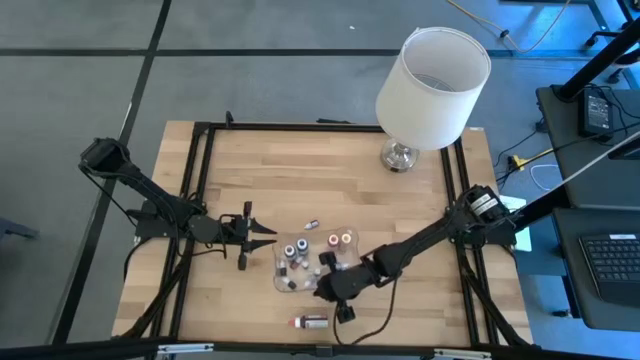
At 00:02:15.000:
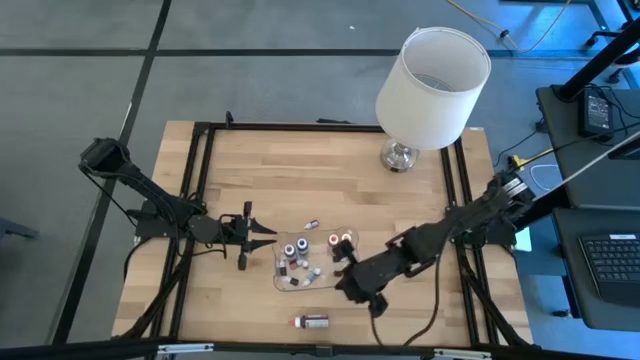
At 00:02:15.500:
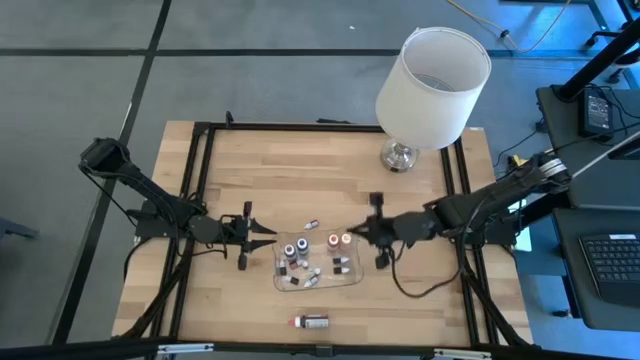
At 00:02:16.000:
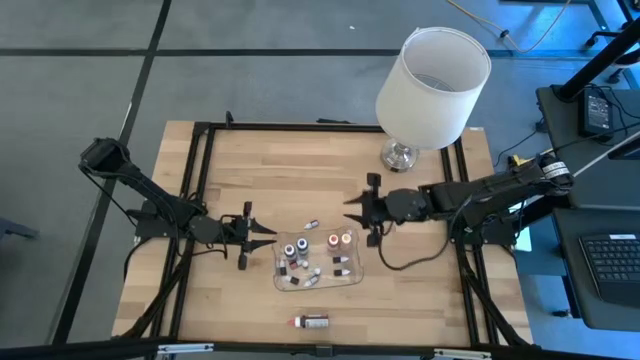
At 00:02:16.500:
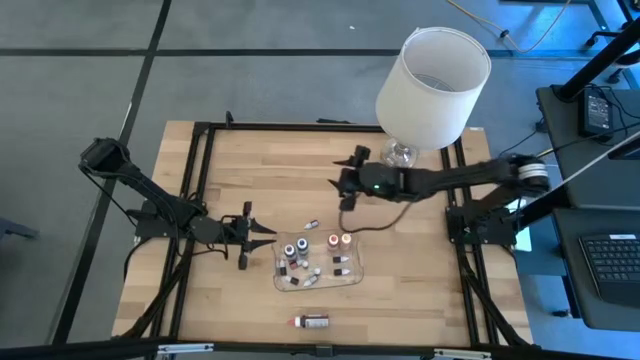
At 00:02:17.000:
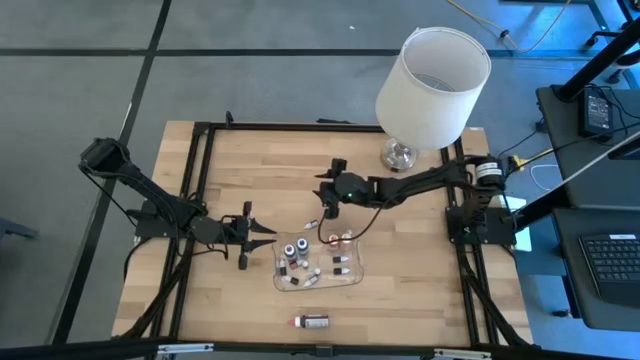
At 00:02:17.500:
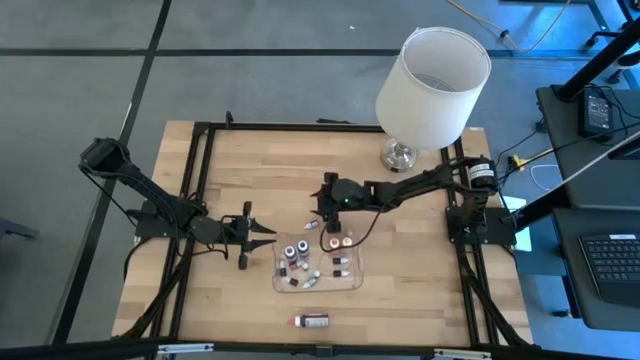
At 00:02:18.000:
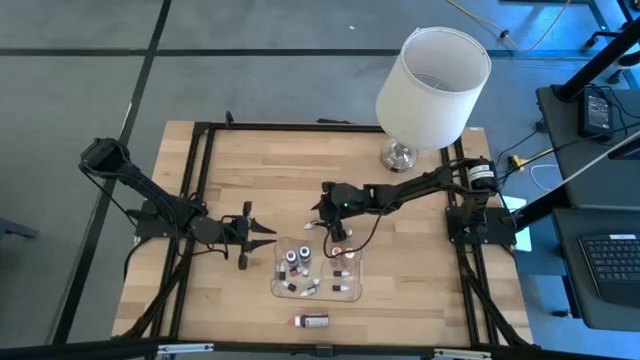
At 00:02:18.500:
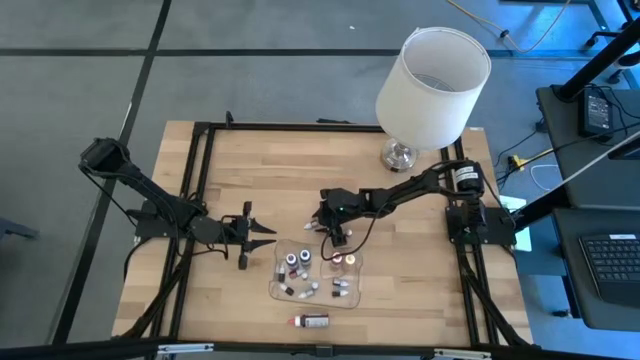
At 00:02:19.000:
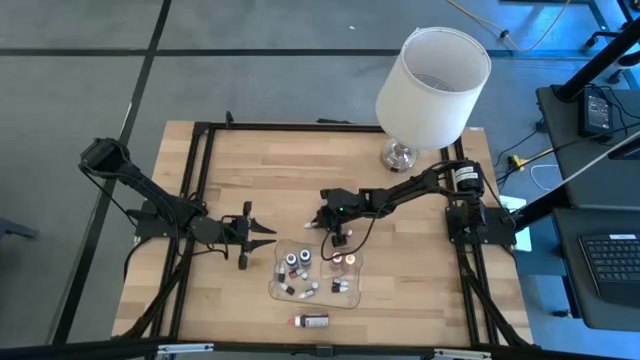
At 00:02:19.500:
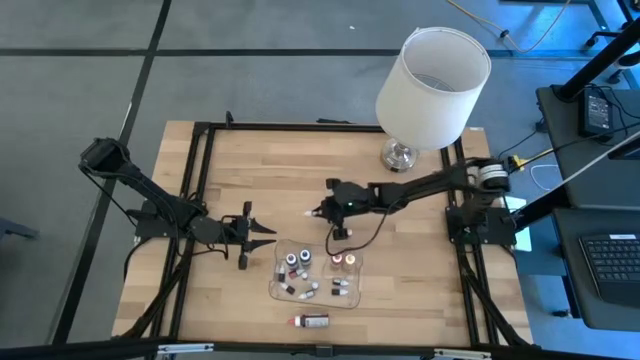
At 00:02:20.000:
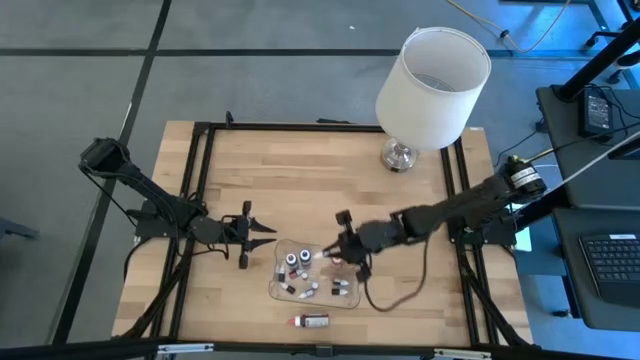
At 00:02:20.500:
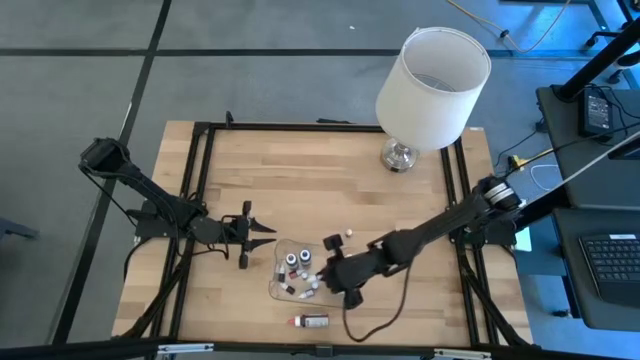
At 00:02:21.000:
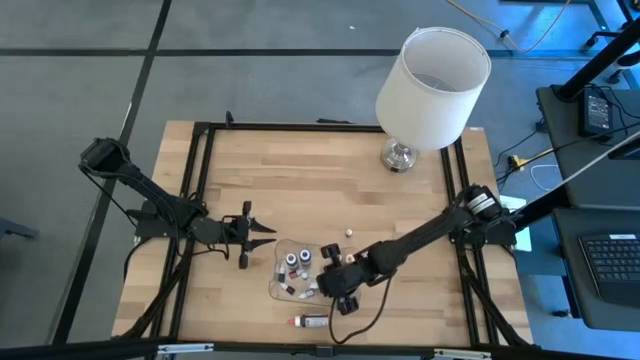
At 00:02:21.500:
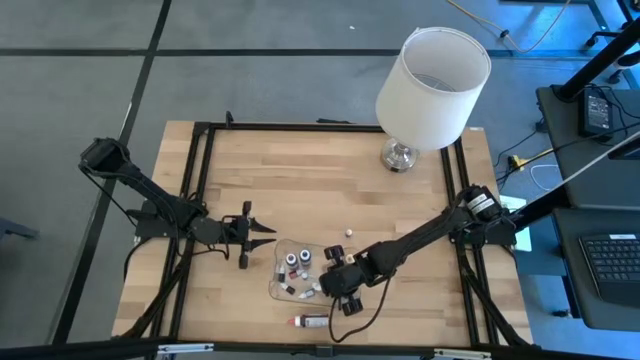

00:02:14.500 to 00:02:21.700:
Task: Pick & Place food coloring
Put the small white food coloring bottle into the container

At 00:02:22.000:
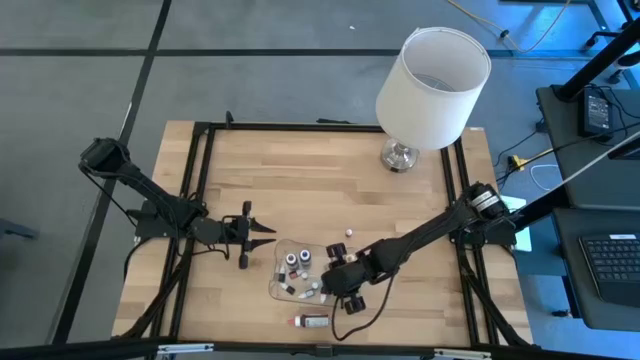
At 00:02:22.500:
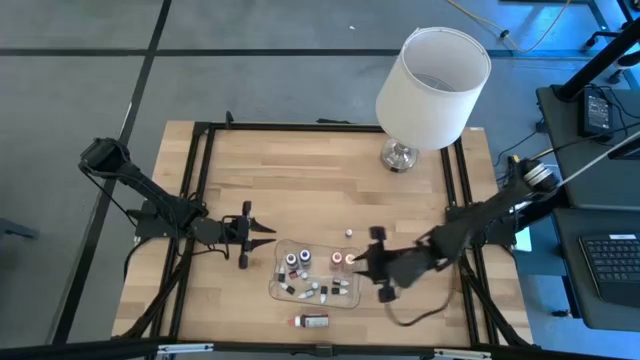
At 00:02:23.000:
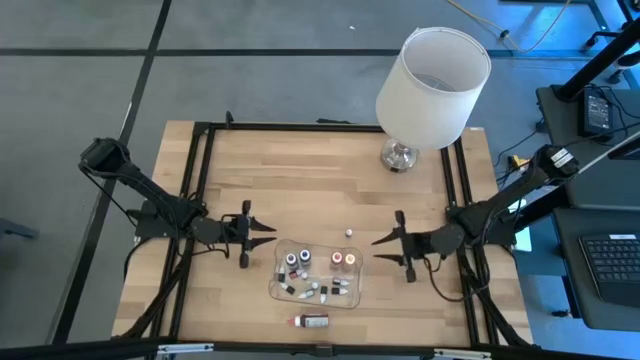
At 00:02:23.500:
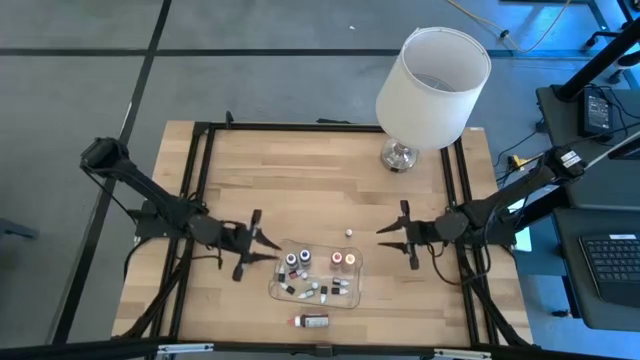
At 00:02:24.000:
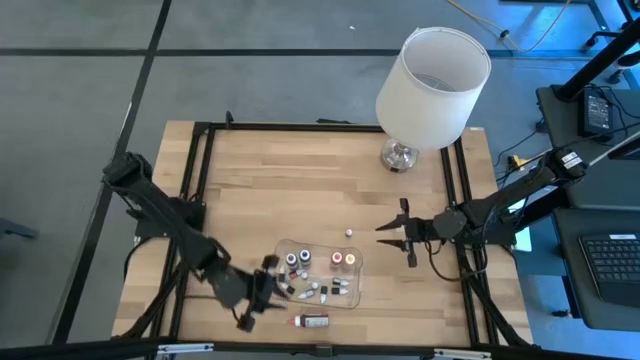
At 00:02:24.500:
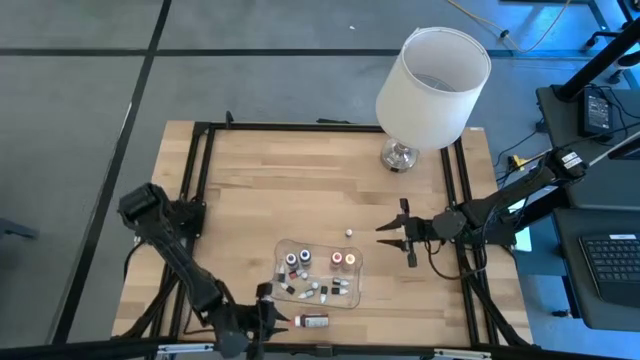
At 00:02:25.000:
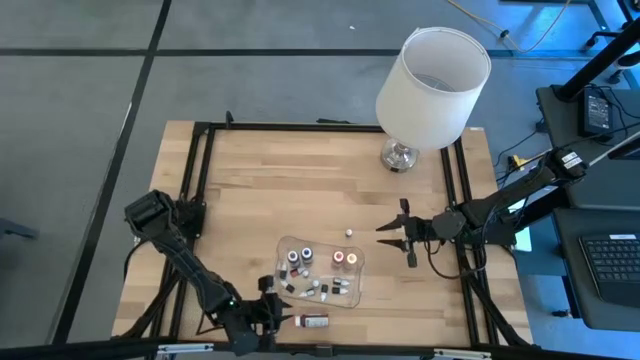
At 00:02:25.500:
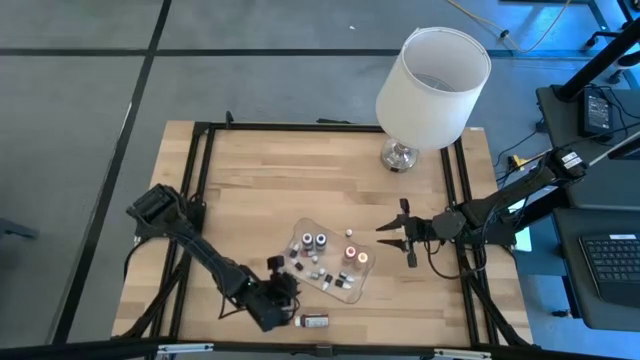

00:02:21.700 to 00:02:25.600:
Adjust the container

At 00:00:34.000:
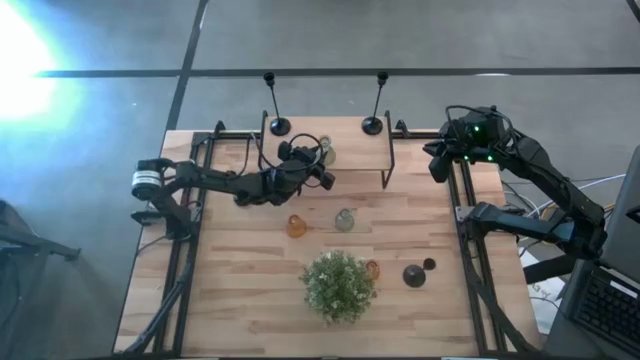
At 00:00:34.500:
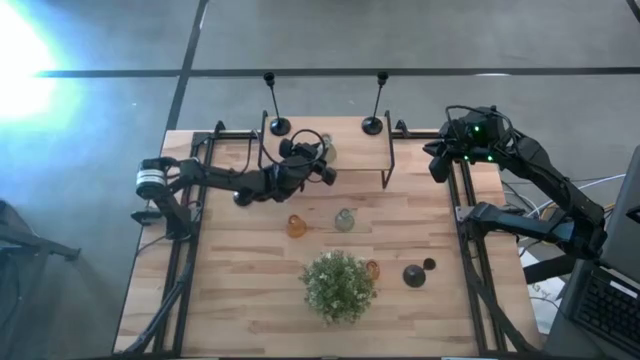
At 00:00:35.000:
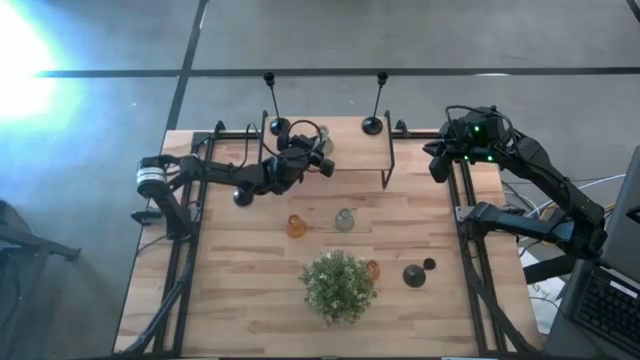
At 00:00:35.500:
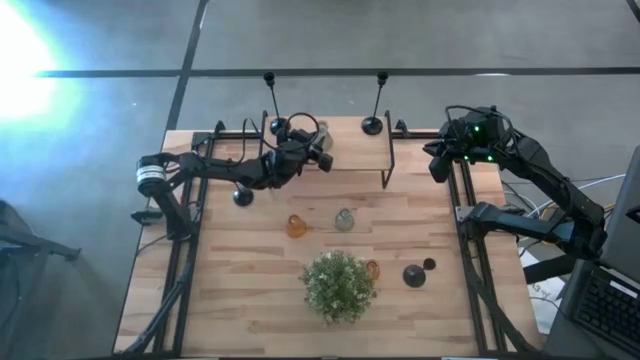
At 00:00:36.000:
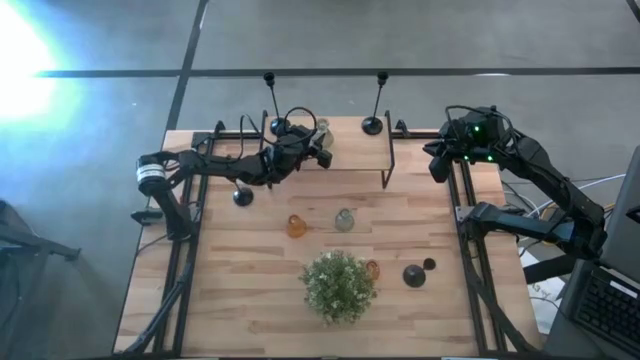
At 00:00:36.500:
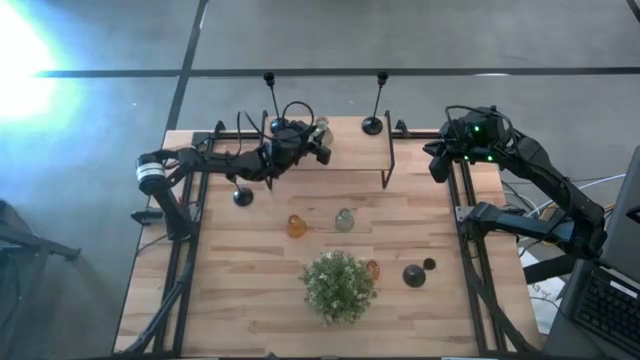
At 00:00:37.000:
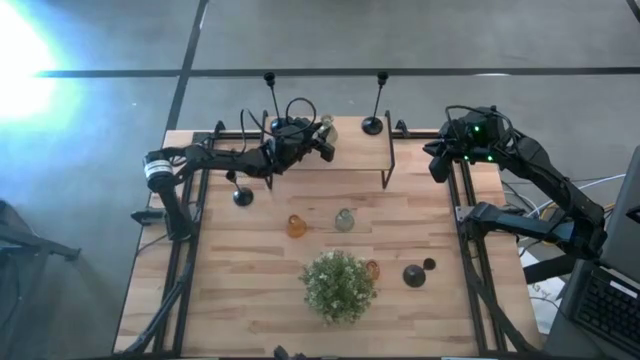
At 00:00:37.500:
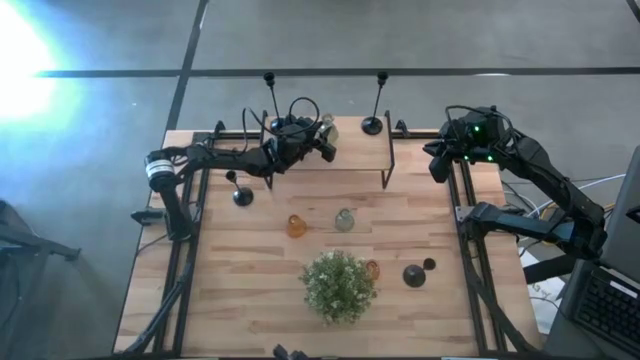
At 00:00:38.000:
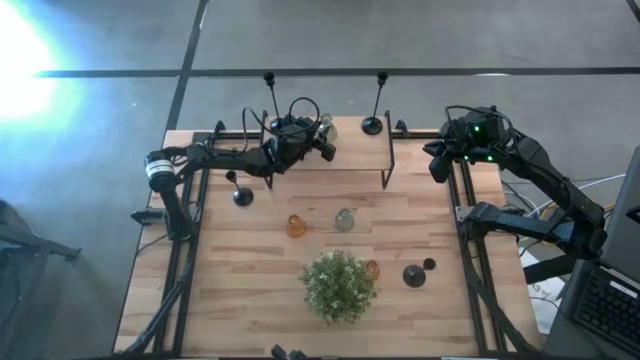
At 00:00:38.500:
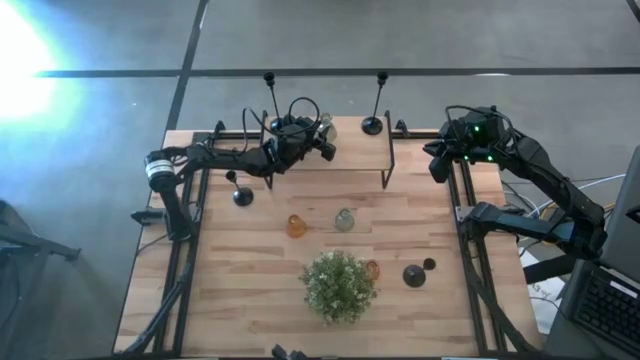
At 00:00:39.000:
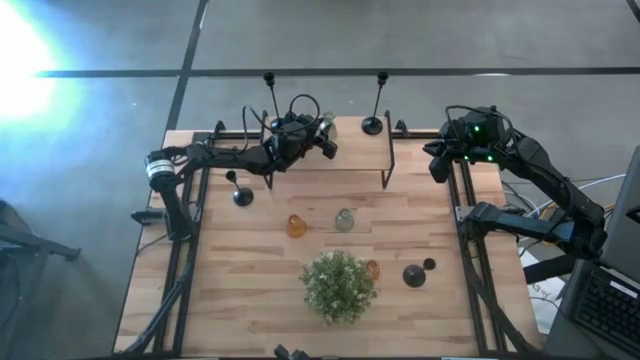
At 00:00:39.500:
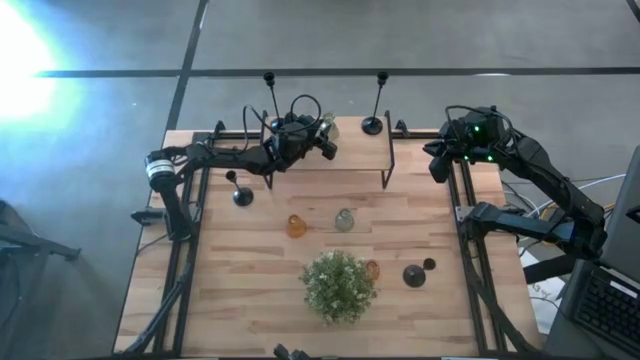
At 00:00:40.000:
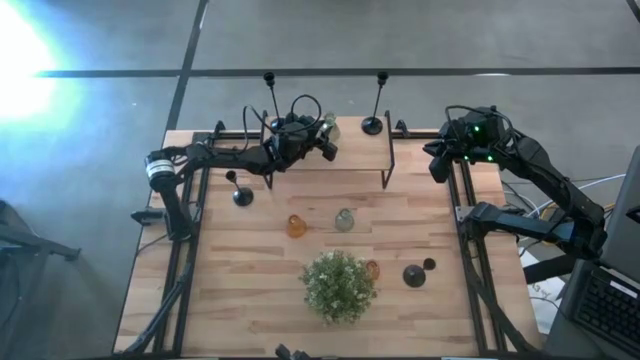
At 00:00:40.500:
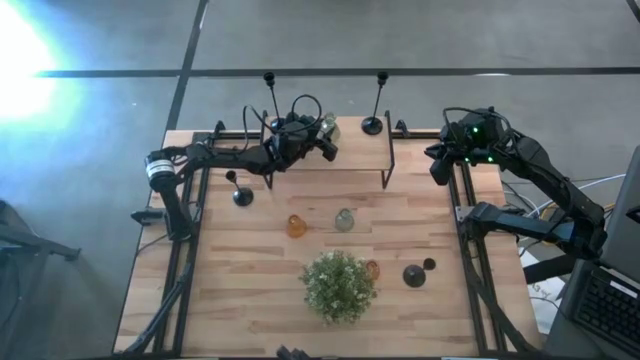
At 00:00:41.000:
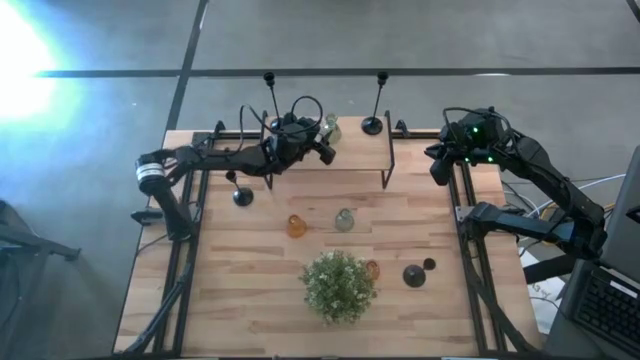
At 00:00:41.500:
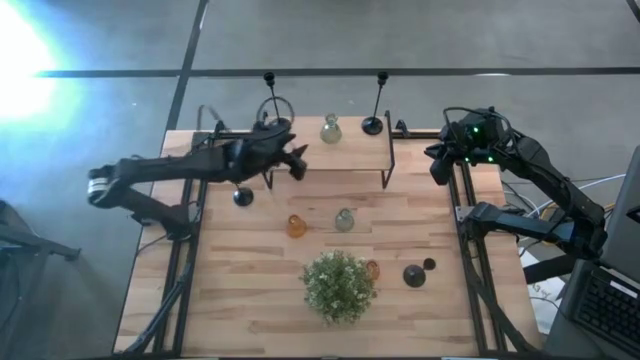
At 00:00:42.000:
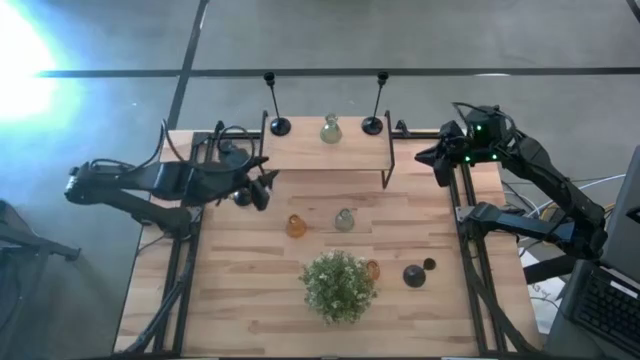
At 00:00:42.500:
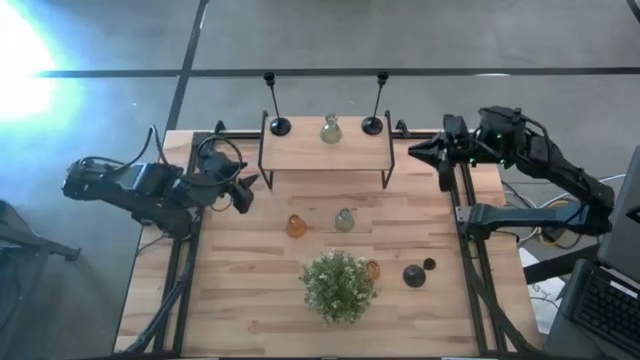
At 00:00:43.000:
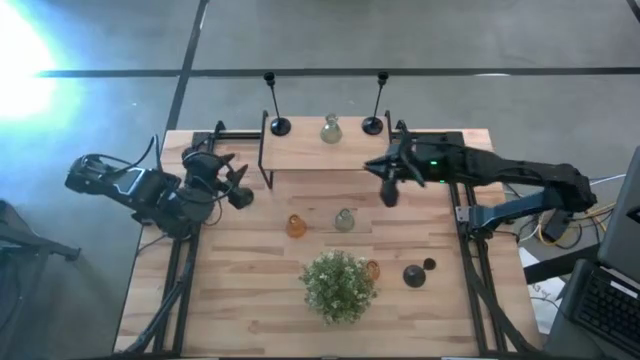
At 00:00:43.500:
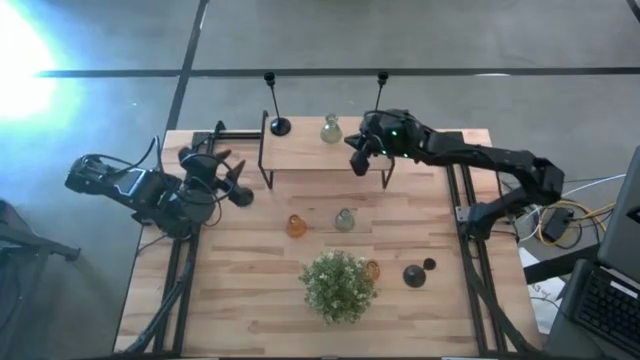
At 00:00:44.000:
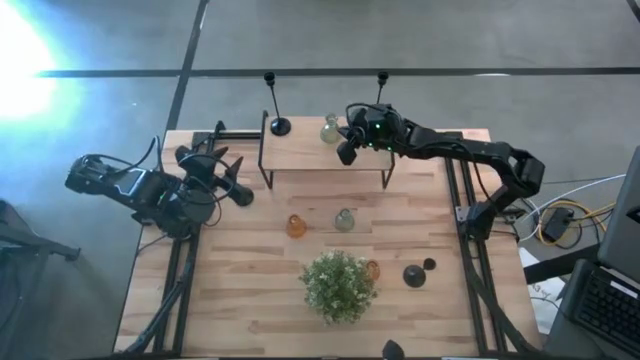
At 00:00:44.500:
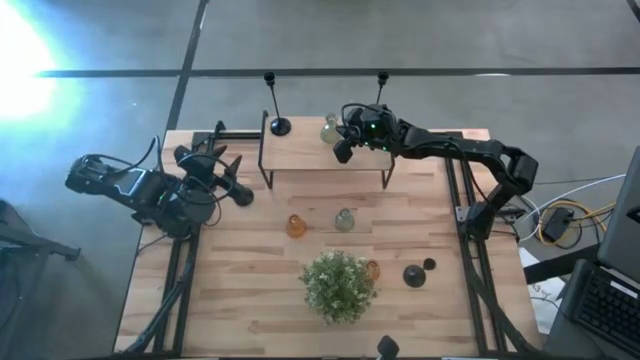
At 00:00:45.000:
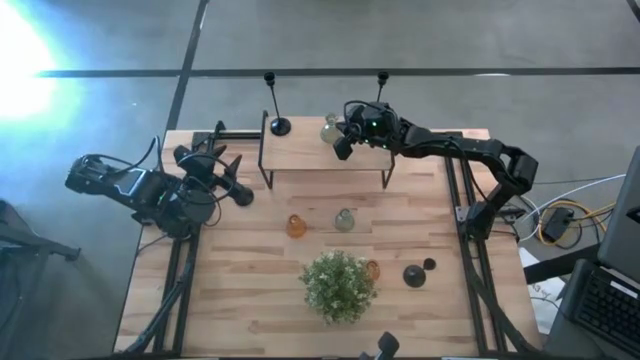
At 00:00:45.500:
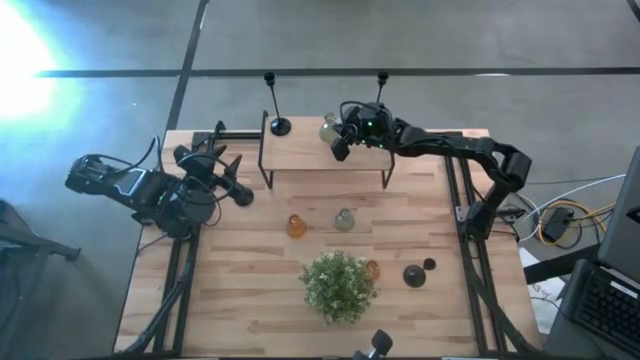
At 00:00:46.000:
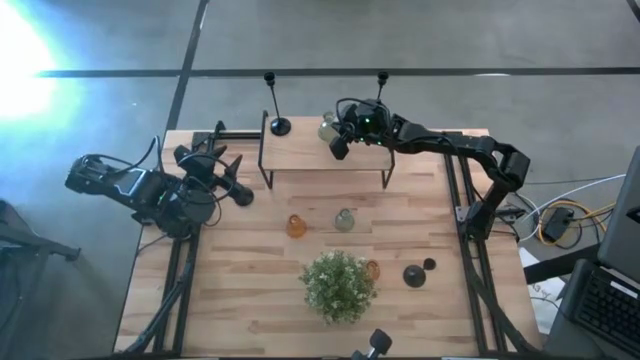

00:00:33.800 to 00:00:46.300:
Task: Pick & Place candle stick holders
Put the left green glass candle holder on the shelf
